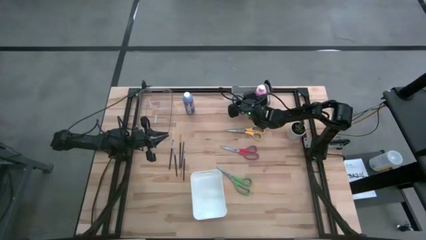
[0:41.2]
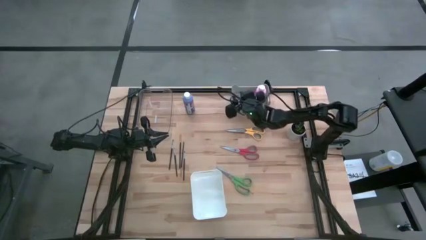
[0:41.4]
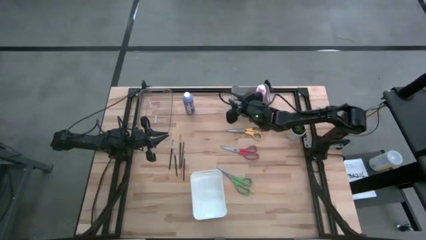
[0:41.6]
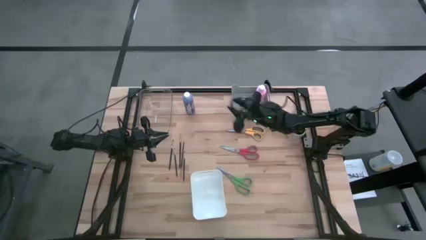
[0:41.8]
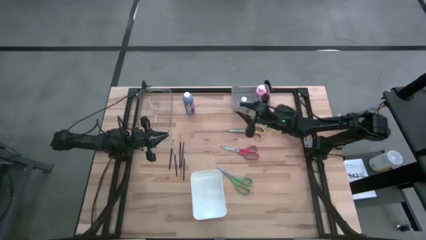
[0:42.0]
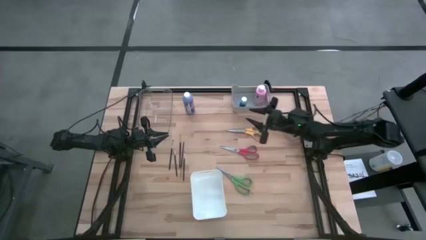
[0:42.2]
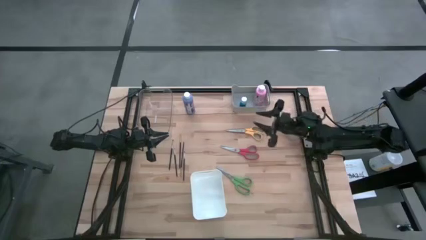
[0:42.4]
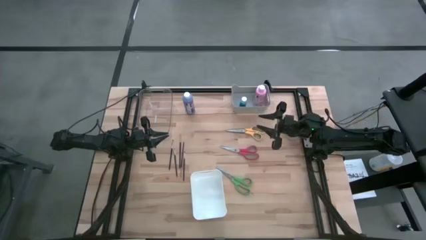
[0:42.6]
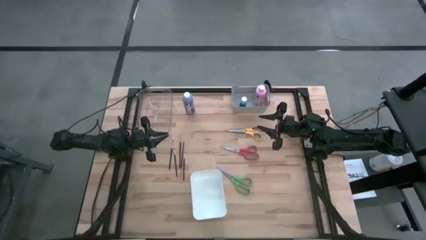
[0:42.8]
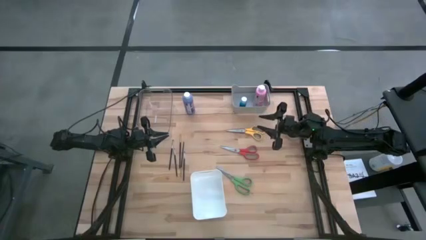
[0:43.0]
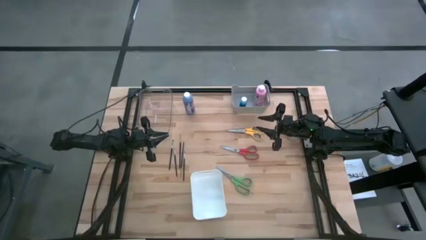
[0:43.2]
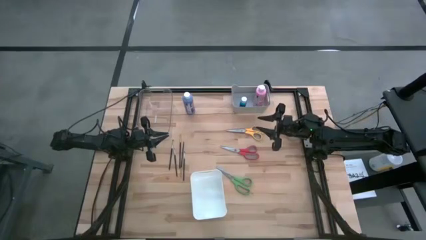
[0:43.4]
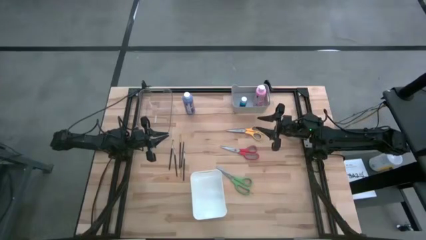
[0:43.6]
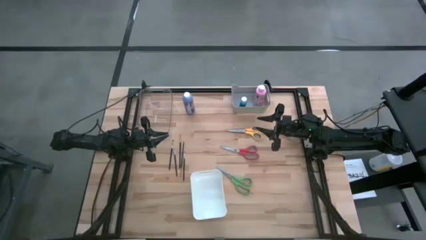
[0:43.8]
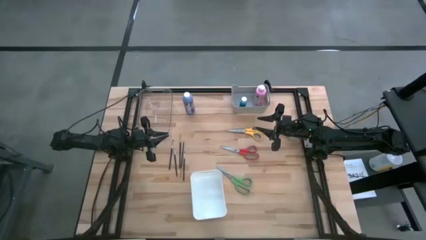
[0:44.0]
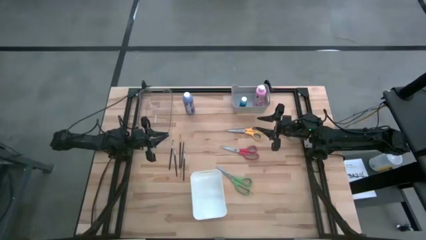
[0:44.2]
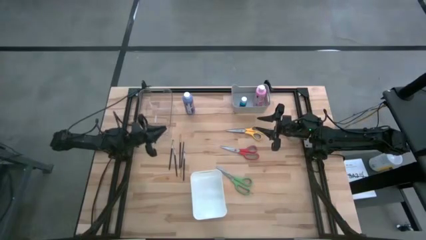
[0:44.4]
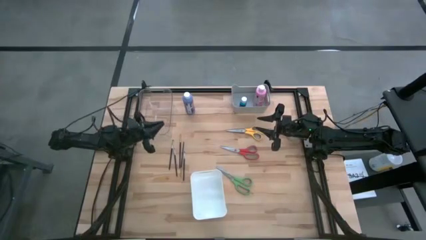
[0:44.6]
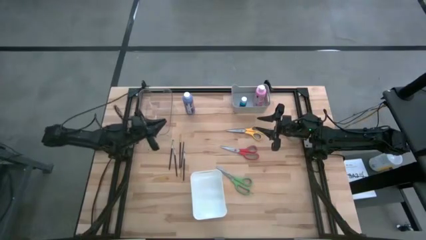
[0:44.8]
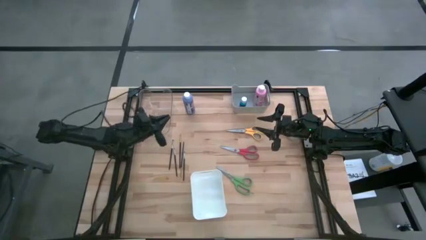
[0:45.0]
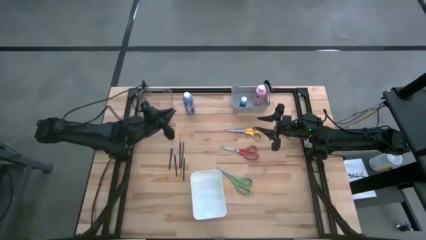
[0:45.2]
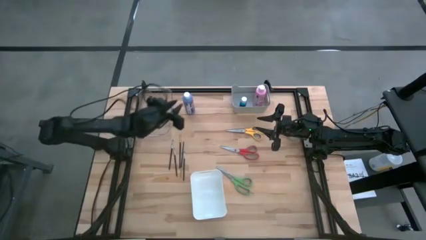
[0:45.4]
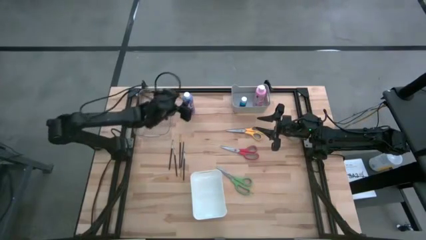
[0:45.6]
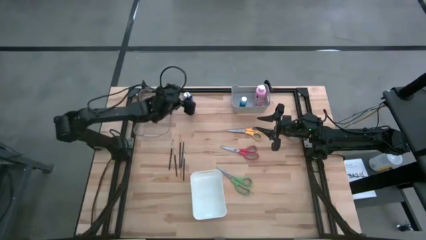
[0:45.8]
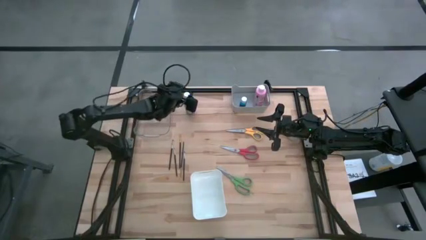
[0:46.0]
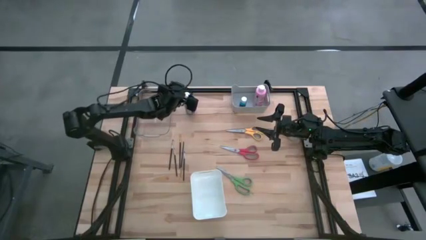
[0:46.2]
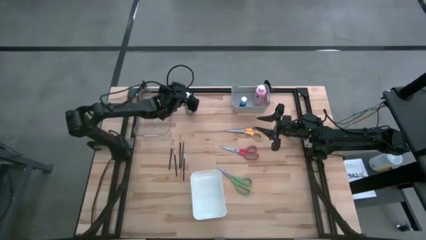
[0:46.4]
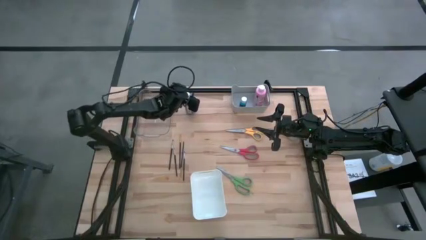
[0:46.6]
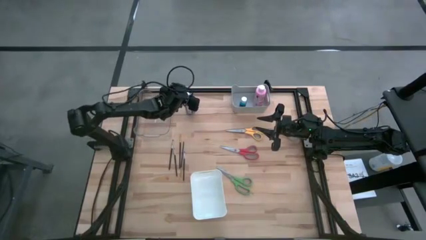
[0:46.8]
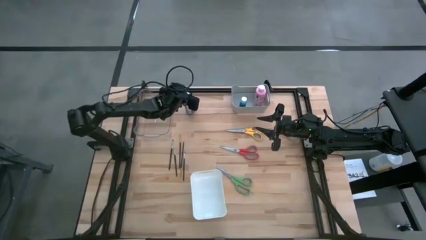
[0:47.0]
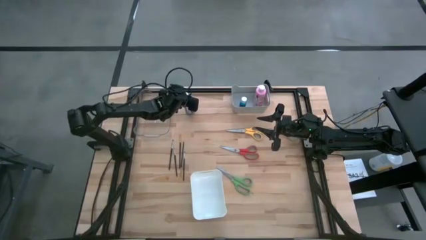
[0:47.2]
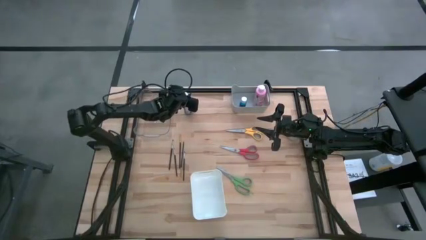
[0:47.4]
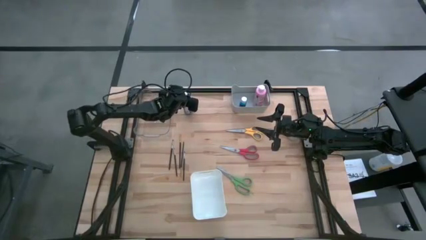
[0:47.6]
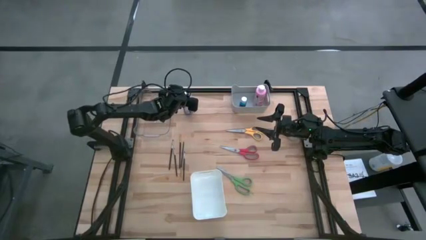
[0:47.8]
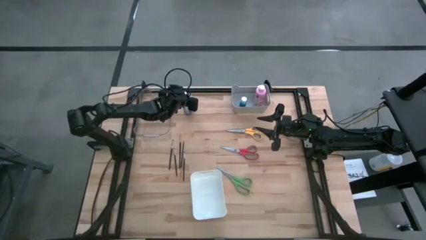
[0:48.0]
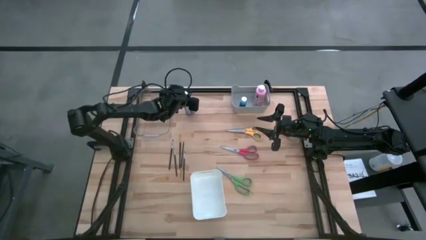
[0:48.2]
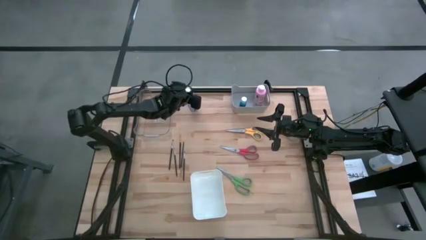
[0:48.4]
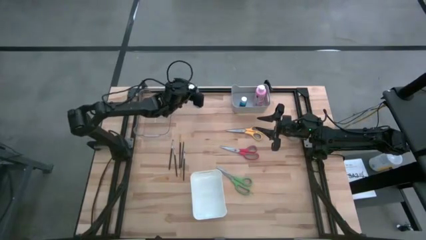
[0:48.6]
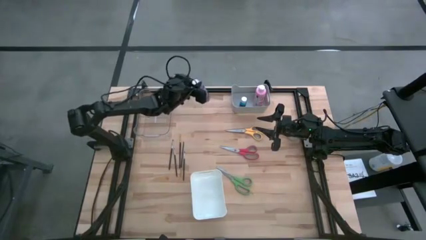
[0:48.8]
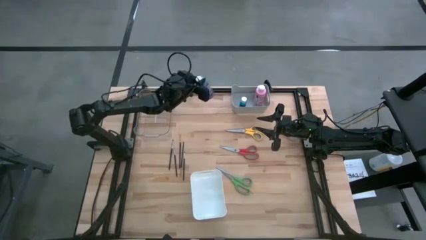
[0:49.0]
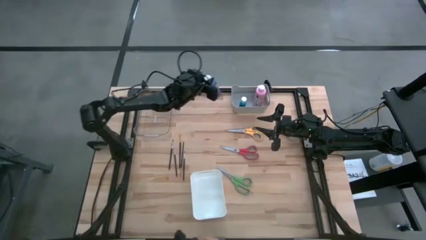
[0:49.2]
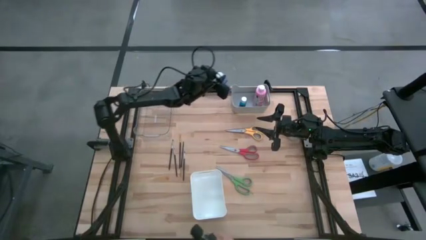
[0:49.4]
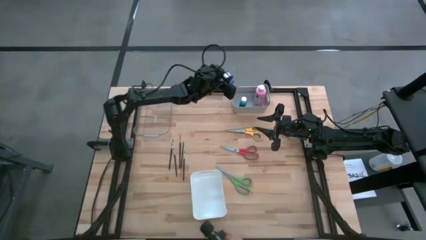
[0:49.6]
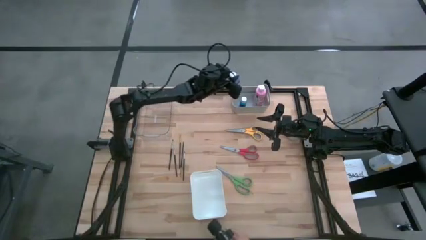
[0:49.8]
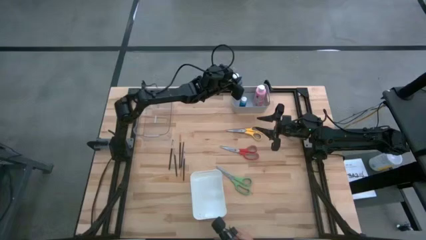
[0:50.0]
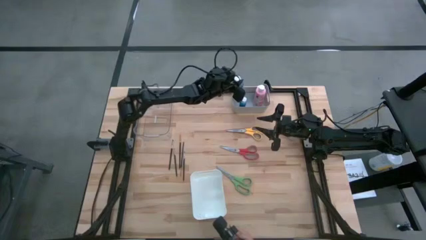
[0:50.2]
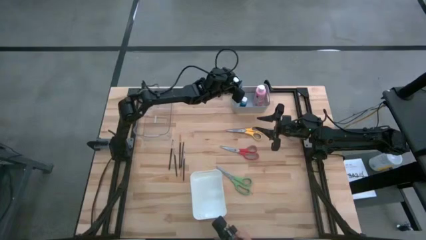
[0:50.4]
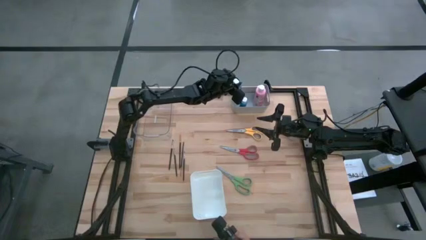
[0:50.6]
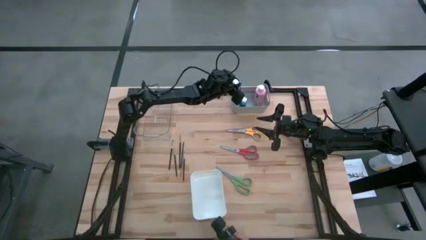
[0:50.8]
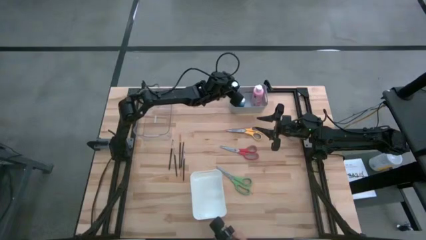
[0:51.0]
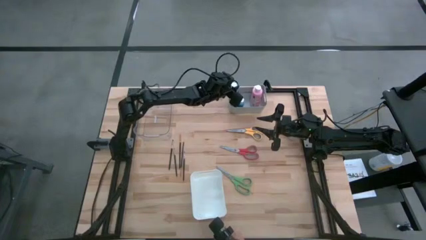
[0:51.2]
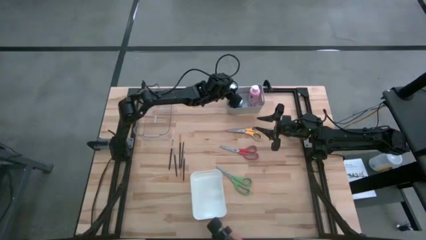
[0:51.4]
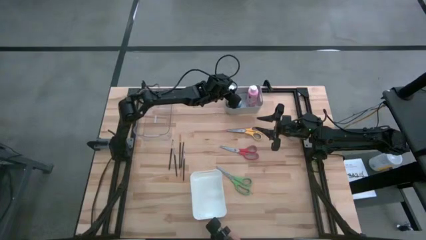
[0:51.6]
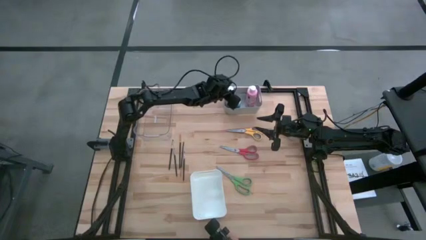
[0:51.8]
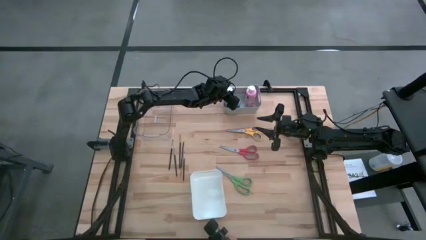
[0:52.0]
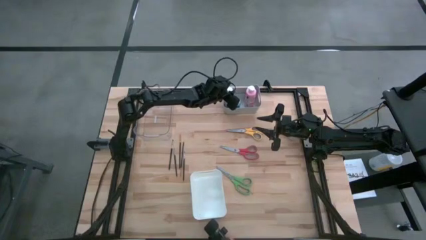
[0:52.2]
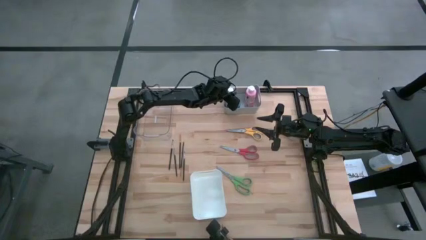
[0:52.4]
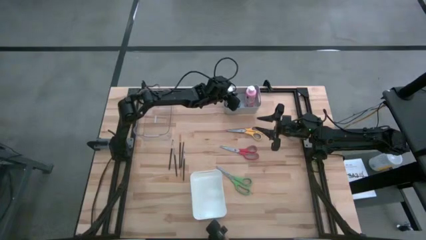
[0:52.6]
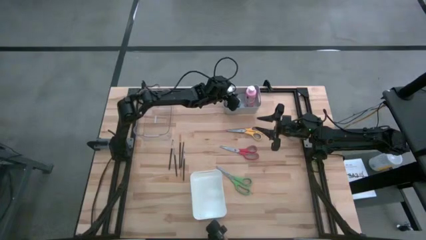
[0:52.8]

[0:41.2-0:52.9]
Task: Pick & Place Paint Supplies
Put the large violet paint bottle into the gray bin

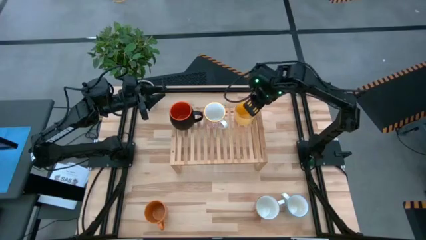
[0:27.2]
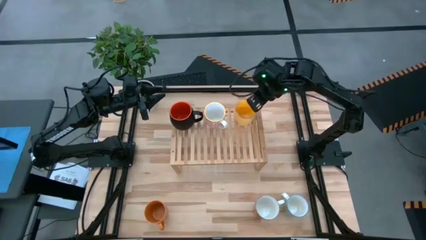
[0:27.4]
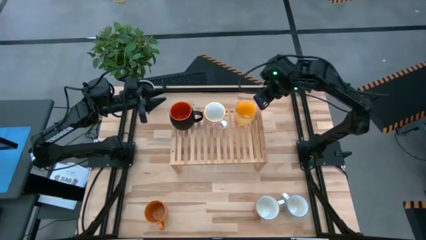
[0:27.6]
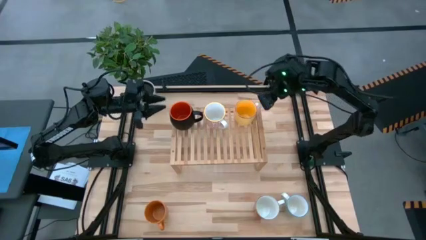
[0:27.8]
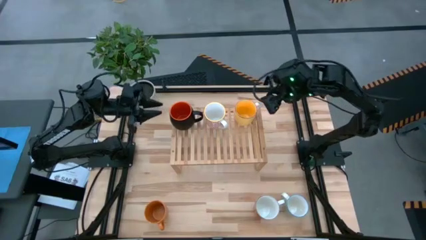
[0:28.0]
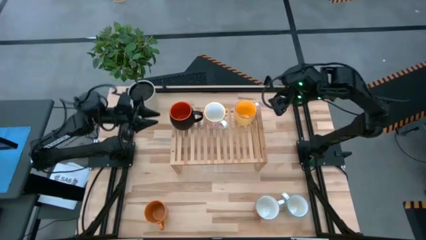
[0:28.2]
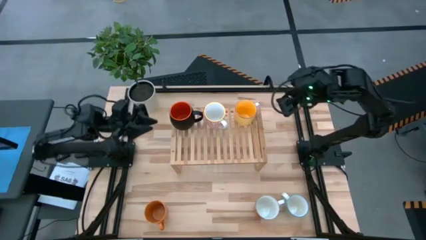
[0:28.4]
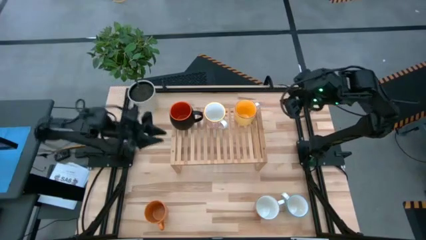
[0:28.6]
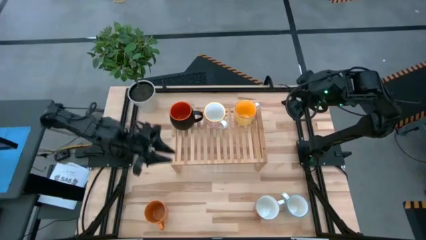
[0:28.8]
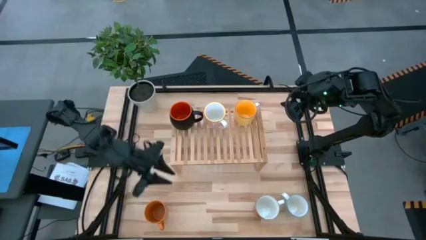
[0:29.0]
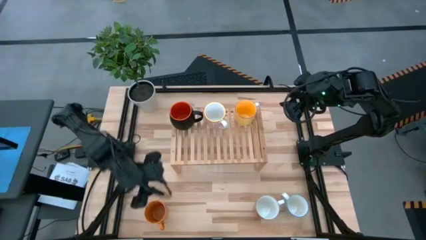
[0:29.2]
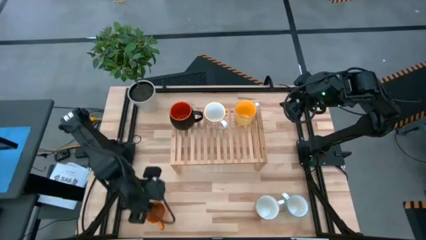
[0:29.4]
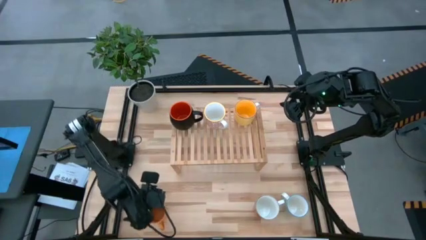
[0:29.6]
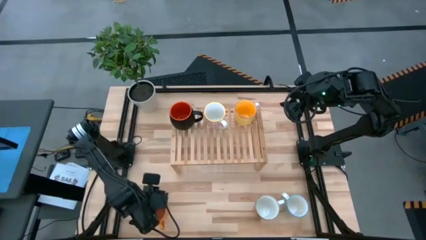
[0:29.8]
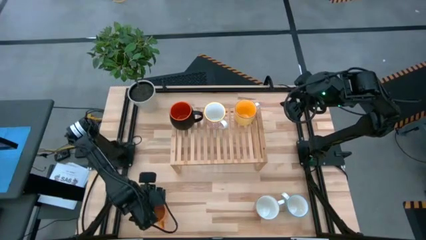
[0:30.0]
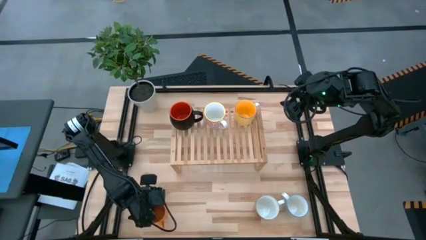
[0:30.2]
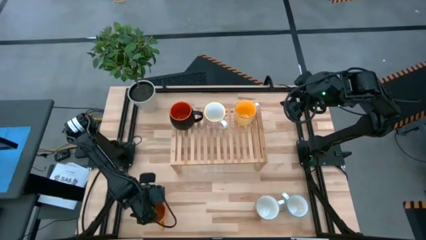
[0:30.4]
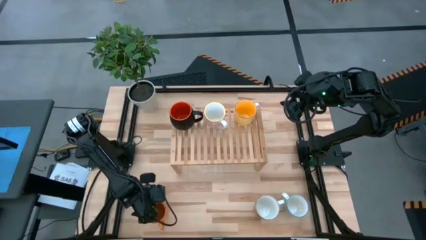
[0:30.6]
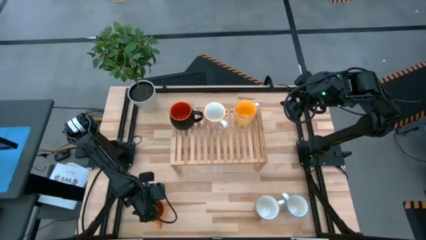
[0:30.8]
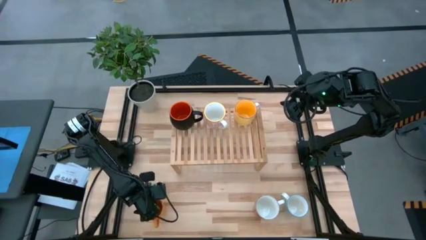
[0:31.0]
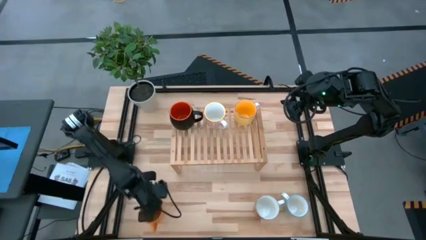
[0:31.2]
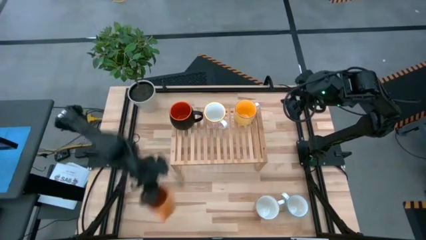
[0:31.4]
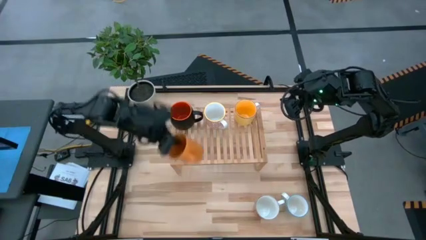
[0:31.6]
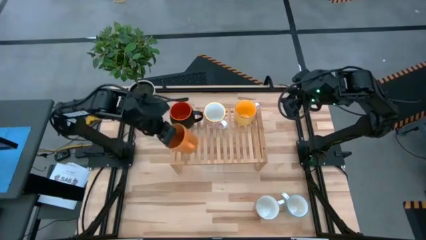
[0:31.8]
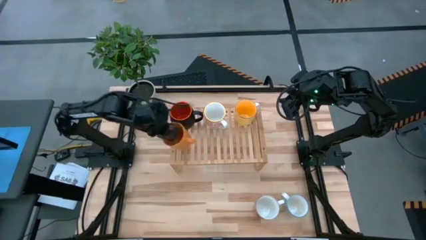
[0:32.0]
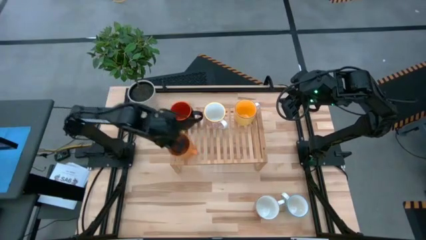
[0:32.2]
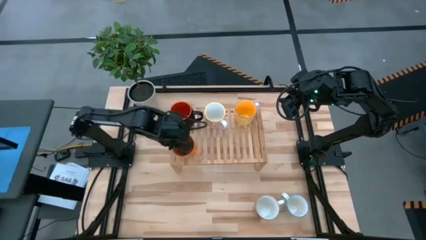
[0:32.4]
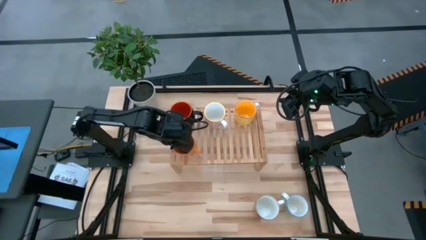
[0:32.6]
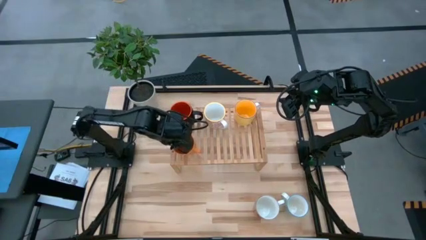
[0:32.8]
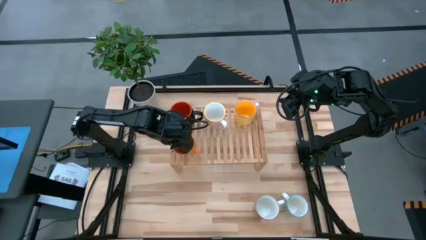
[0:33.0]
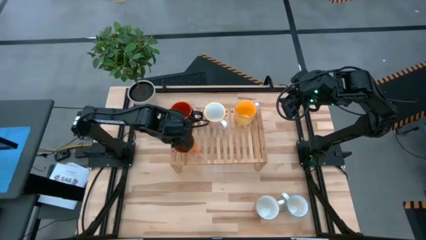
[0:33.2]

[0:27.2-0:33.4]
Task: Place coffee mugs
Put the orange mug on the shelf
